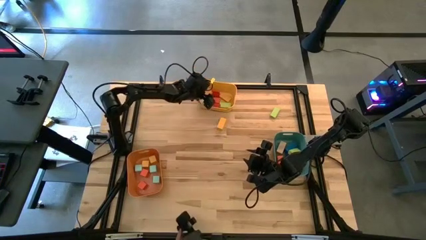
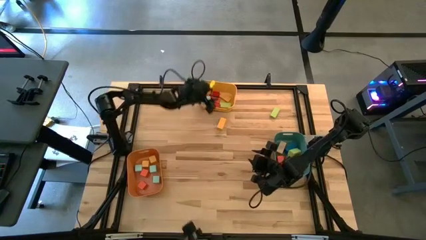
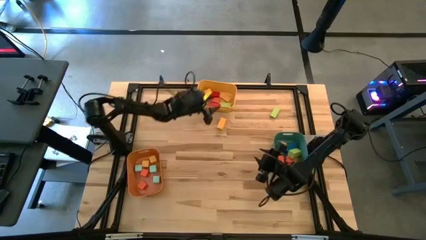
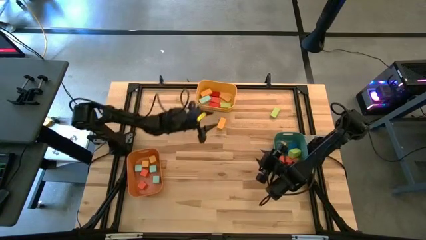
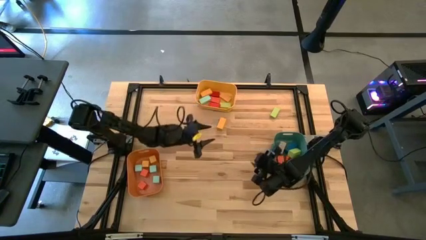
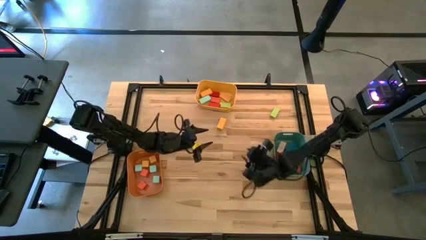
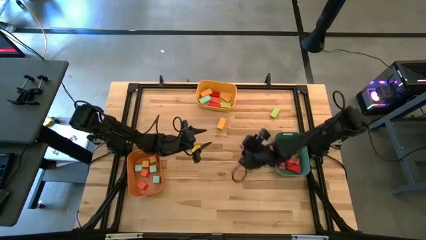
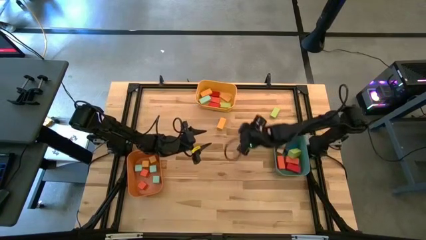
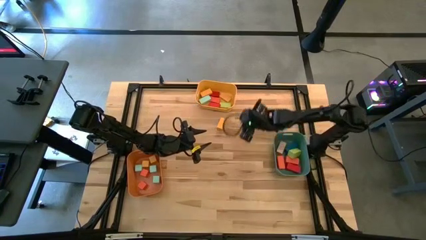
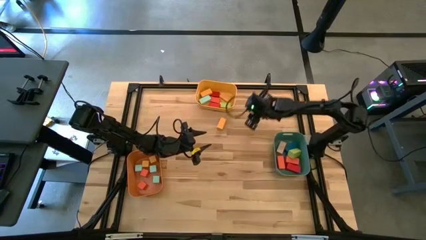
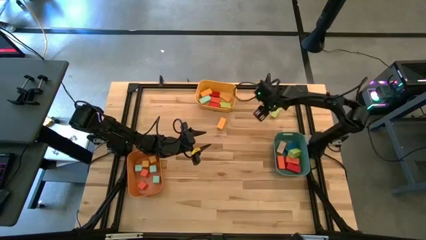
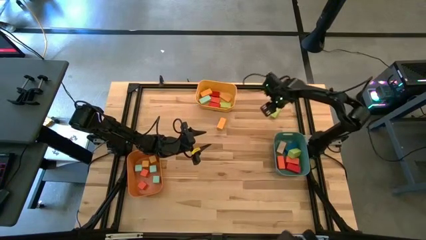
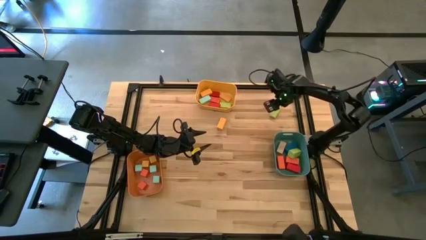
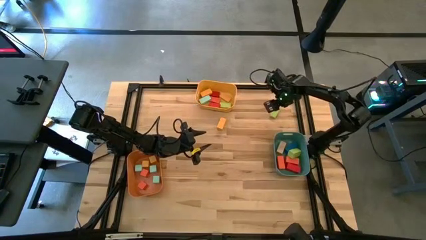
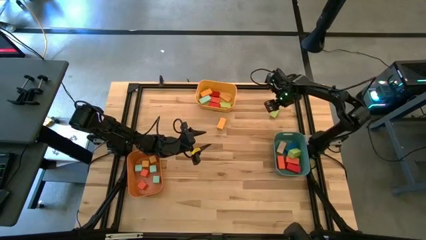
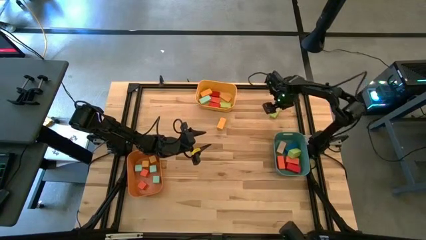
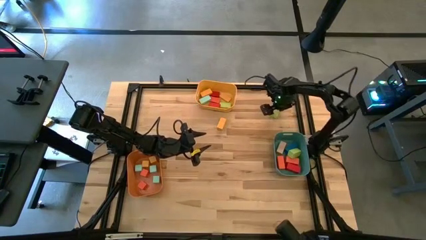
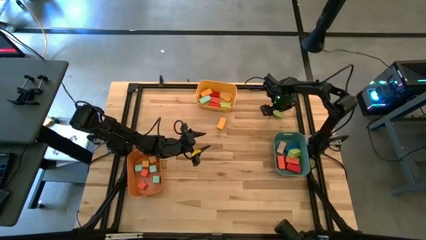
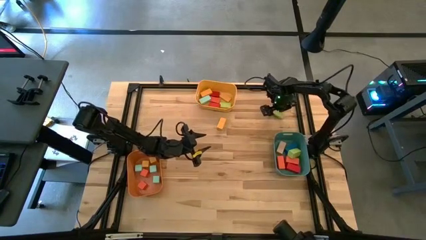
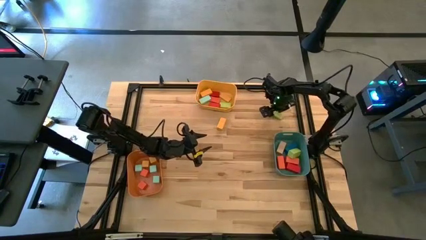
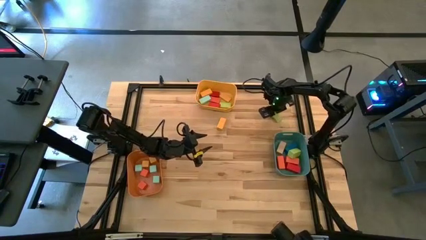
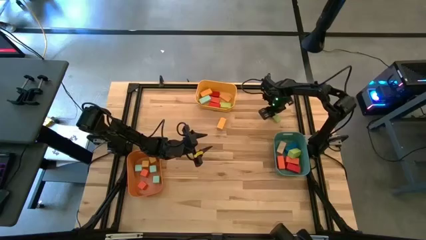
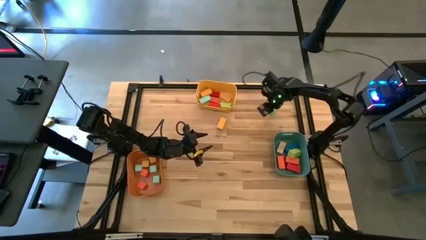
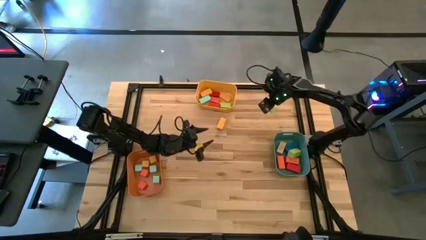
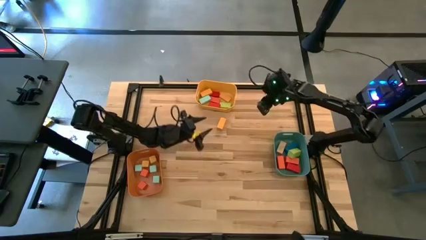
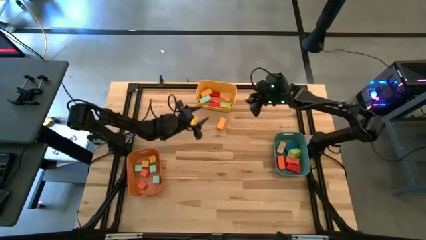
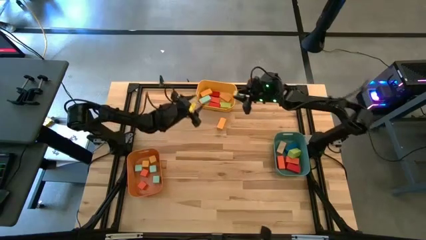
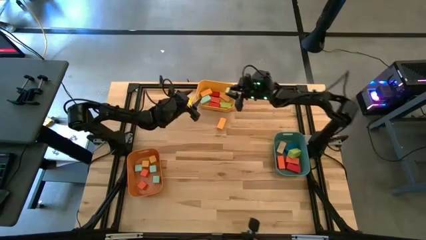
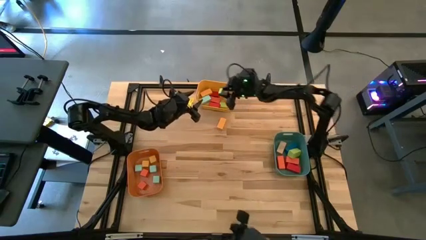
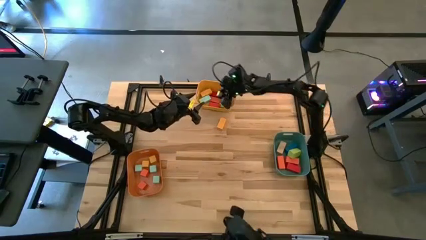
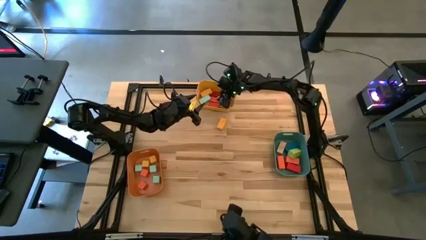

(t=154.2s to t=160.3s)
Task: Sort blocks by size
Put the thin green rectangular block into the yellow bin

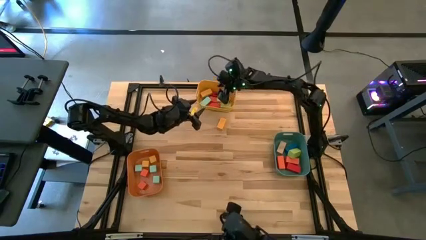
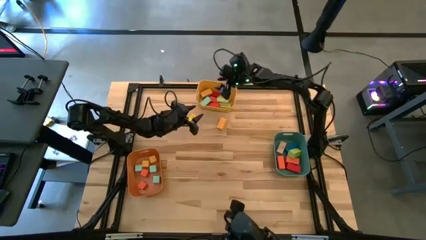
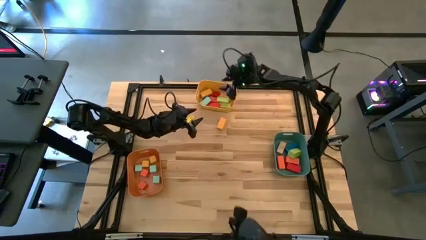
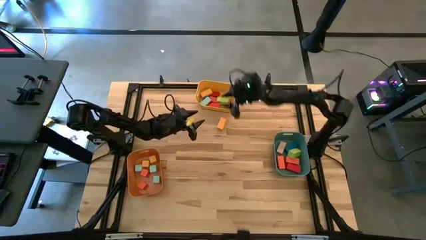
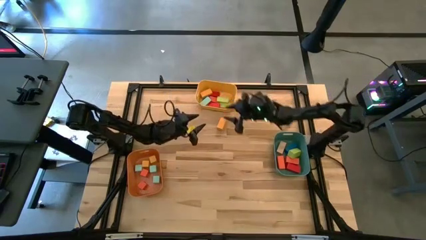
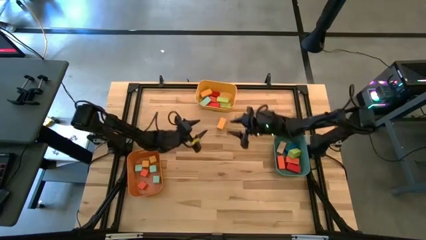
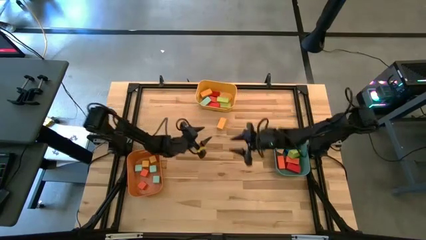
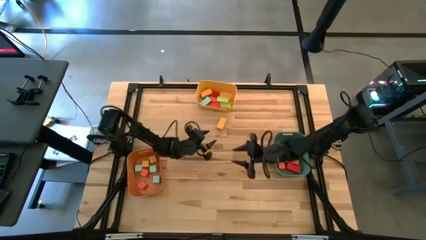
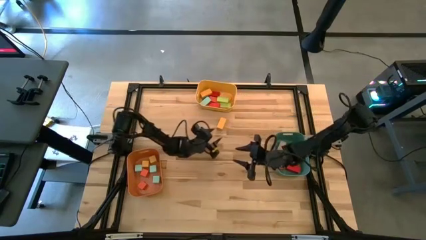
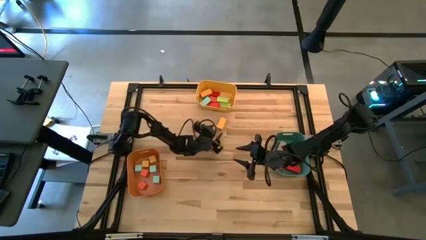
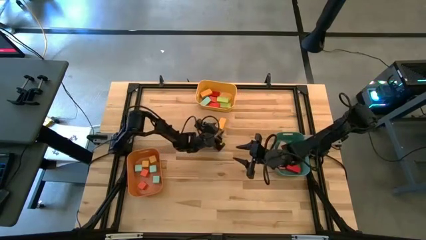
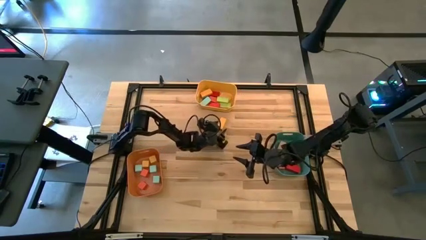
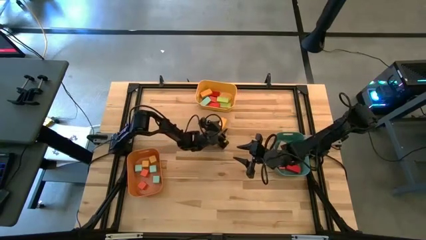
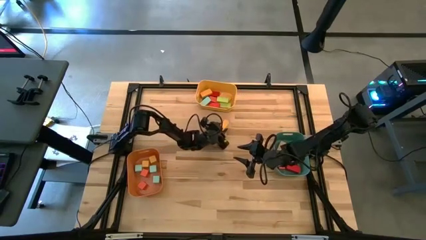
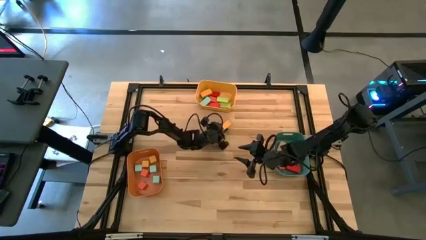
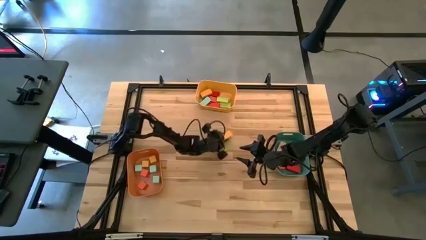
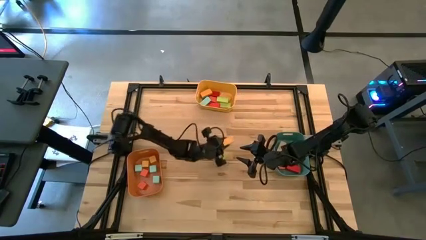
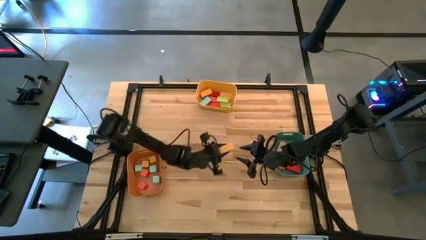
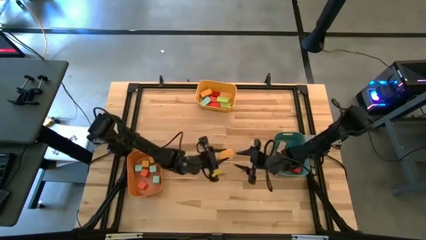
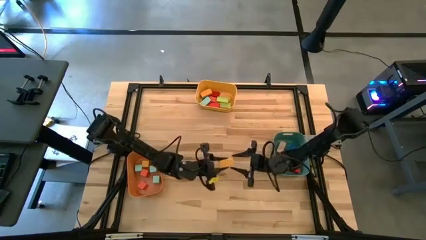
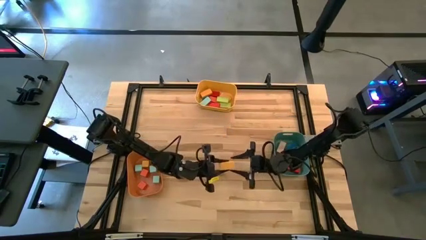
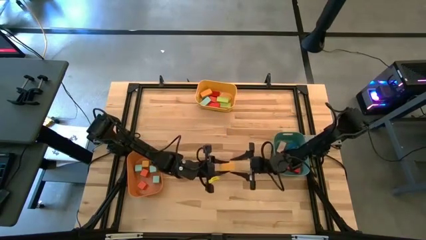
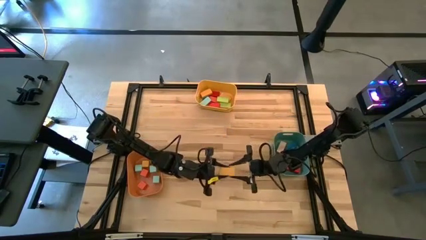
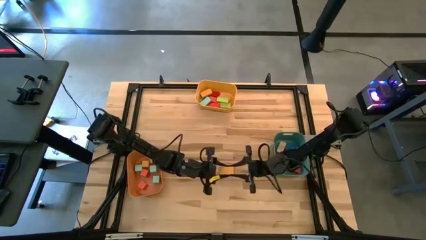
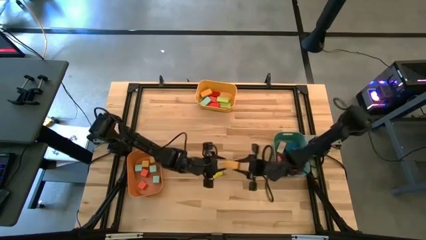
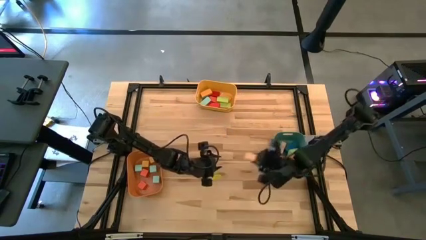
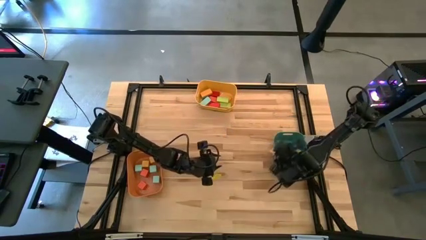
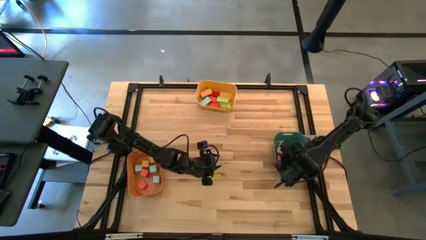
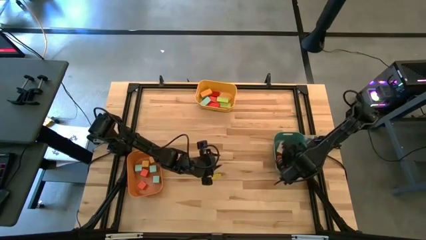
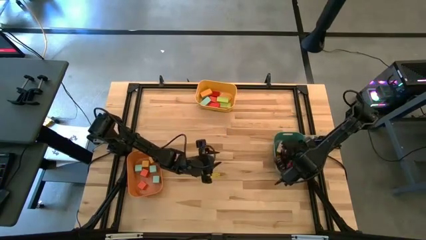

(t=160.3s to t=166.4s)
Put the thick yellow rectangular block into the green bin

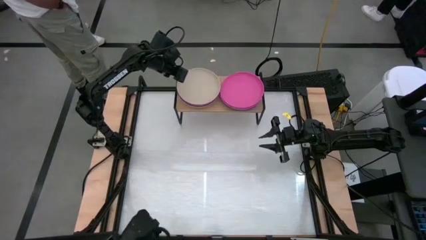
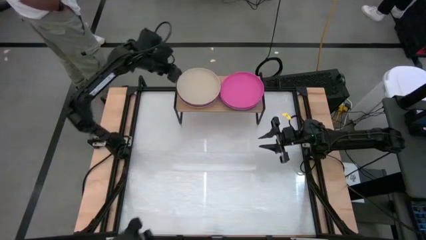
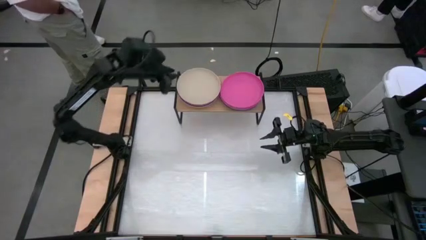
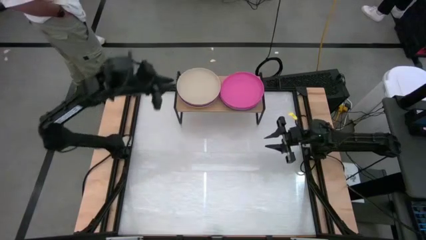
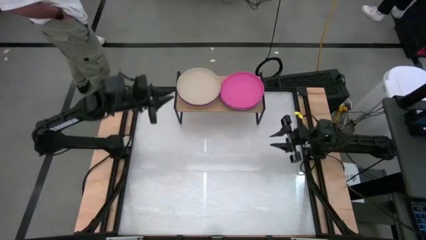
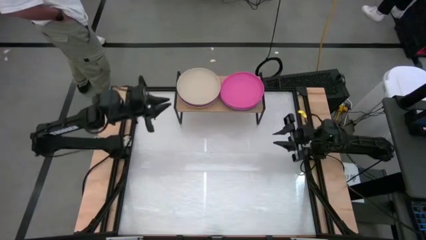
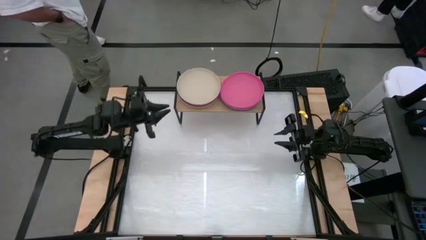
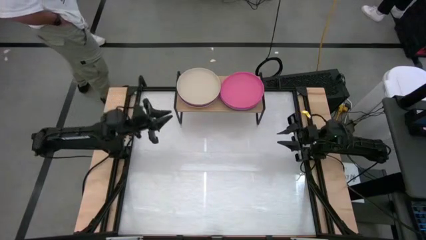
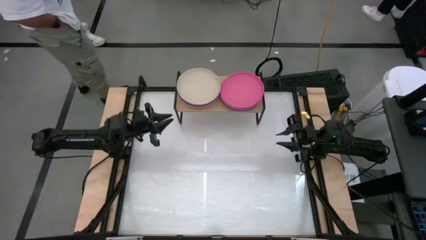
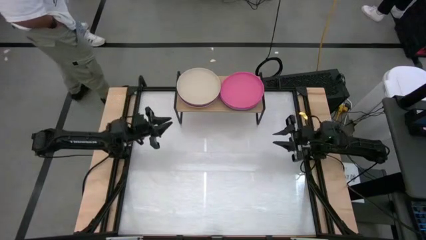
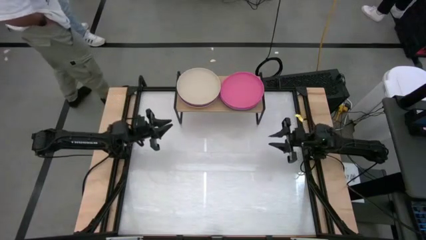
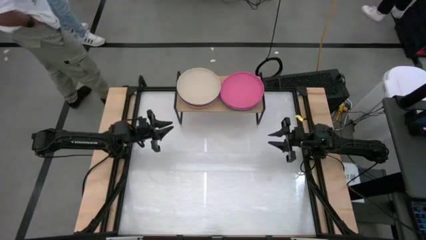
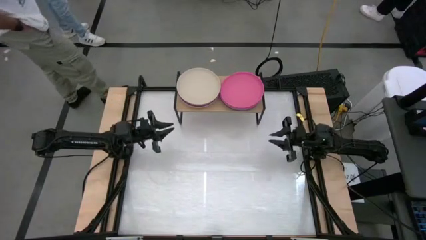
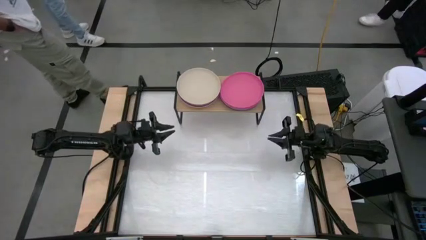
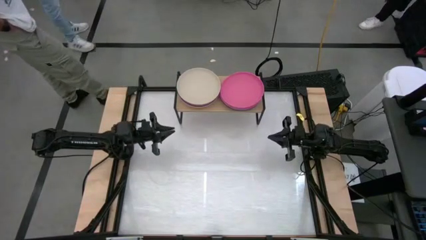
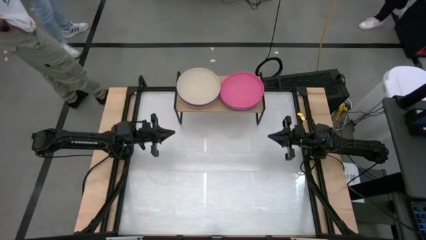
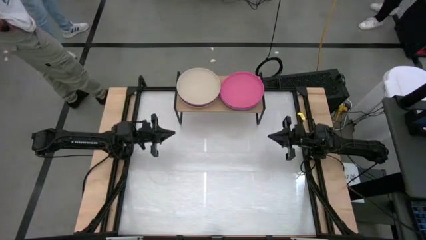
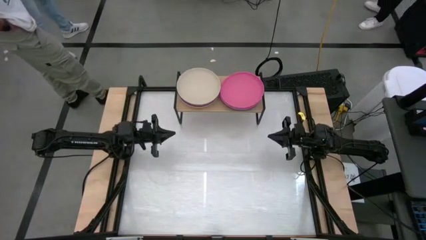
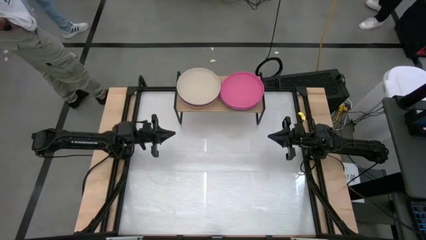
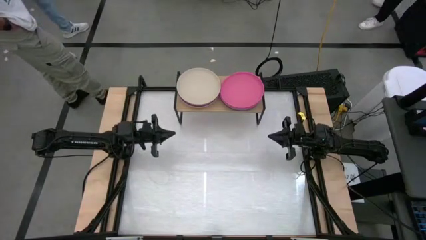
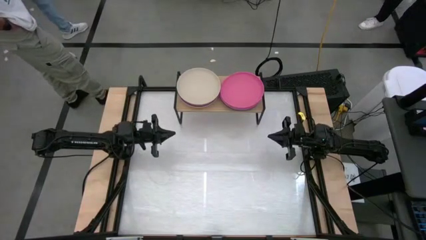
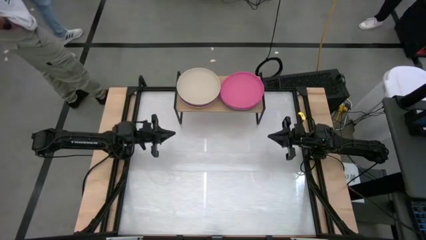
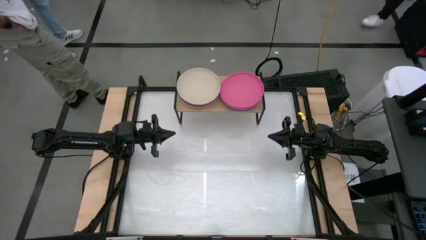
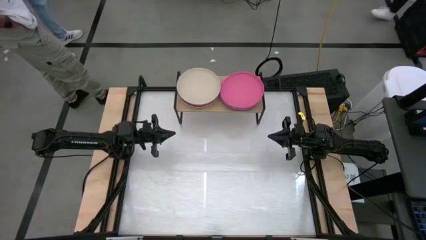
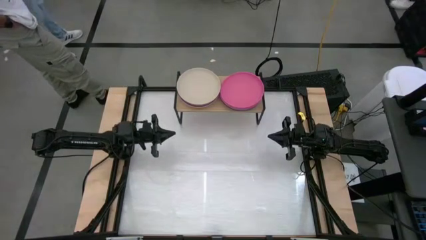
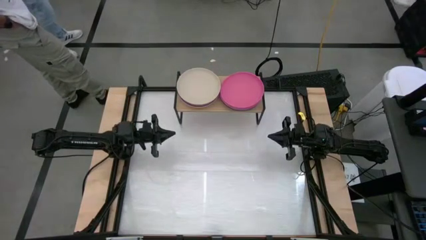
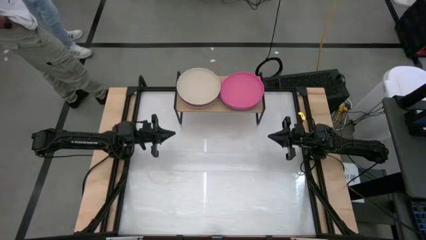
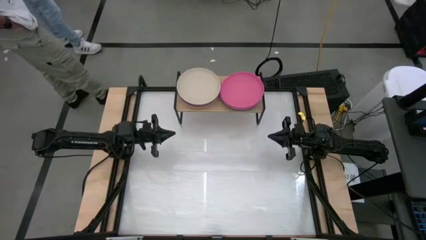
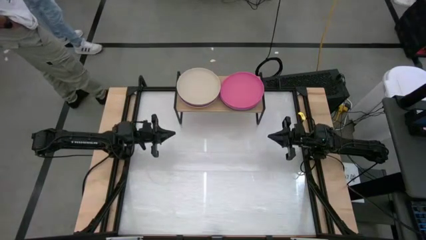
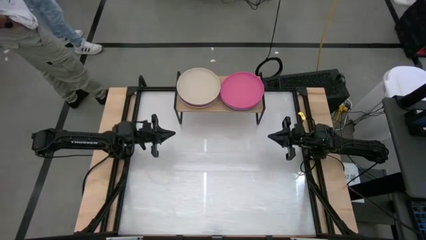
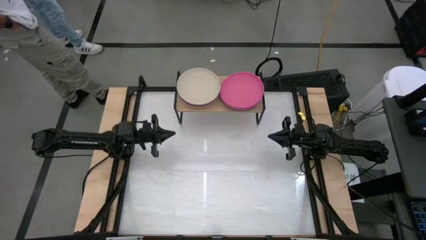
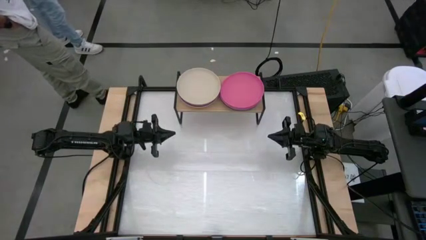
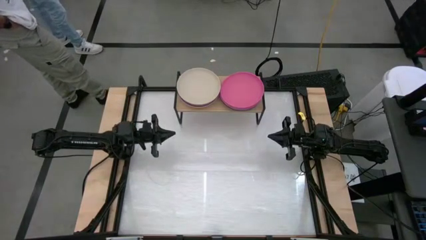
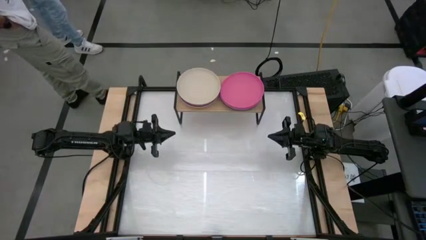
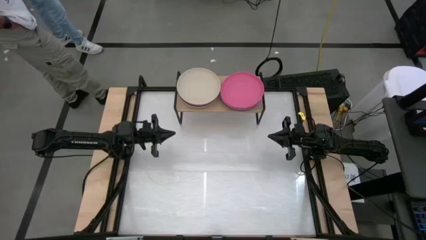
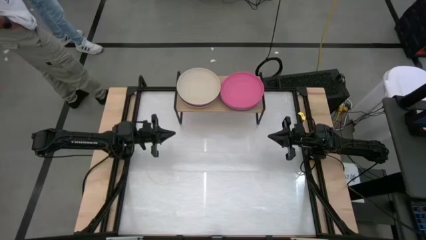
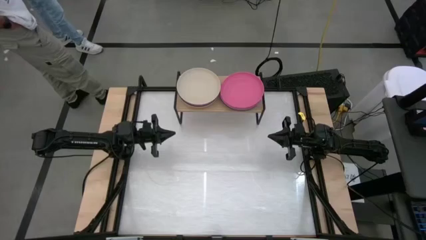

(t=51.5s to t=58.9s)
Task: Place and stack plates onto a shelf
Return to Home Position
